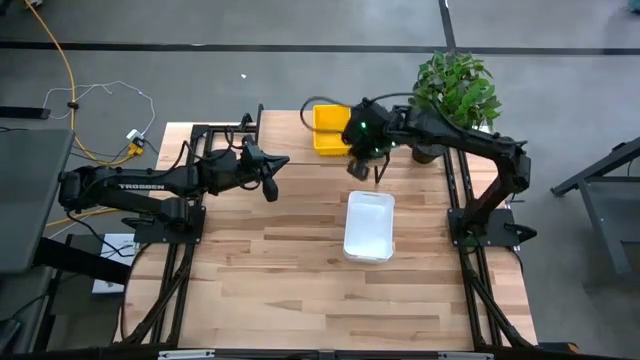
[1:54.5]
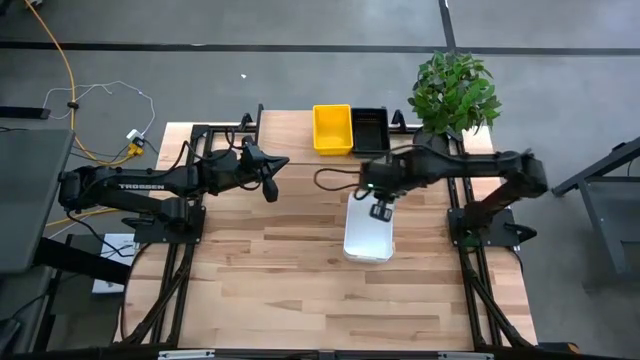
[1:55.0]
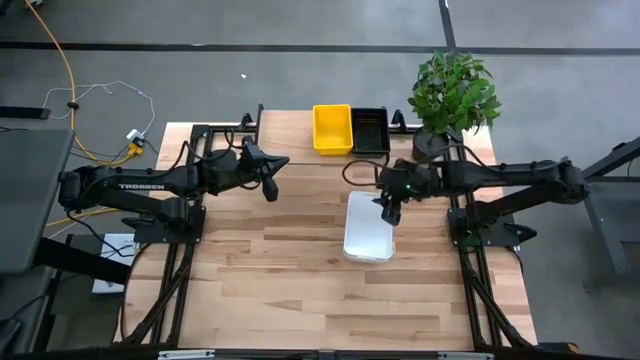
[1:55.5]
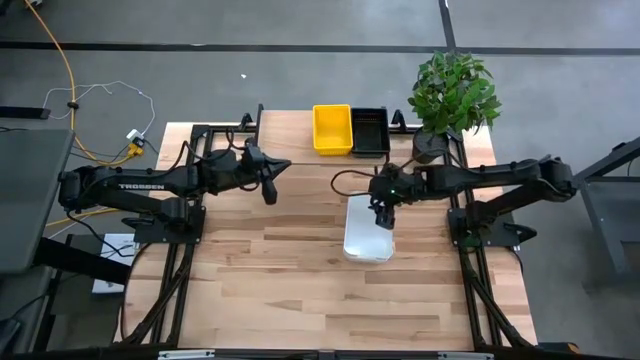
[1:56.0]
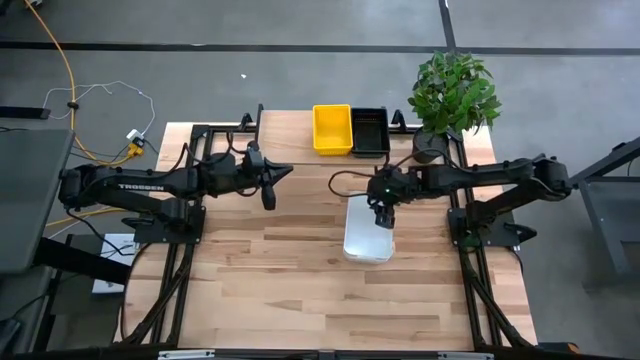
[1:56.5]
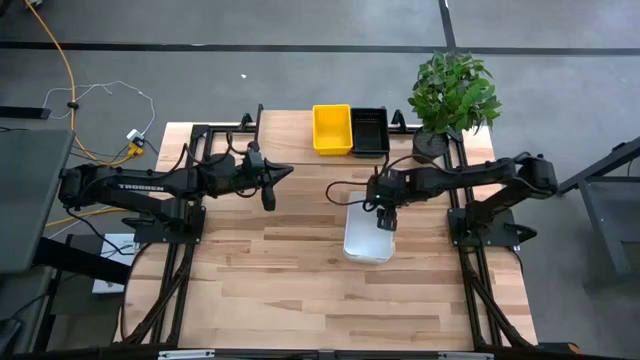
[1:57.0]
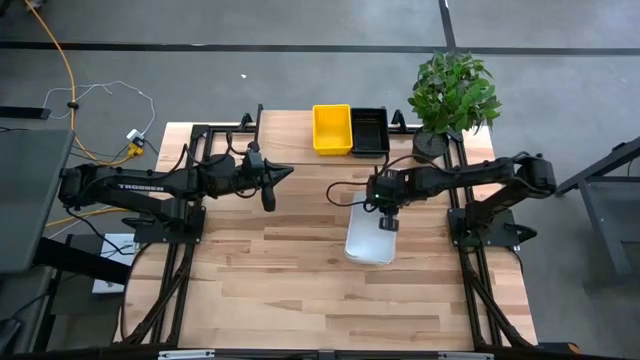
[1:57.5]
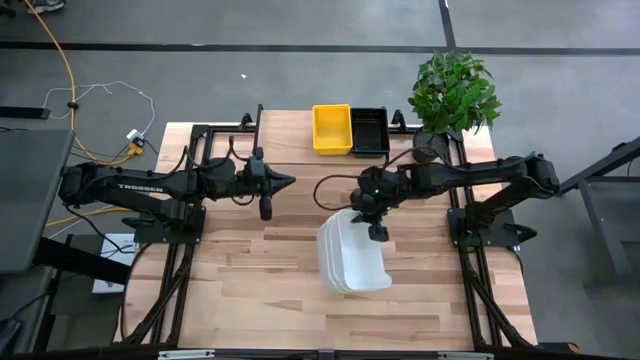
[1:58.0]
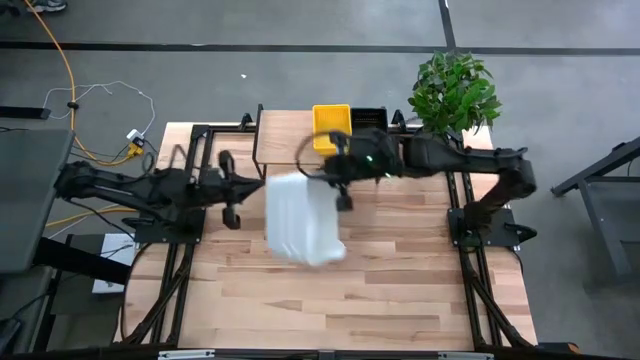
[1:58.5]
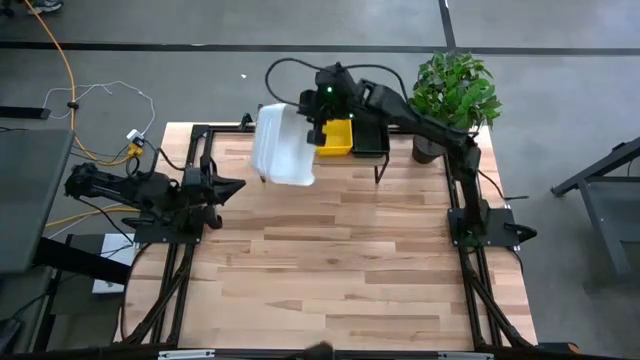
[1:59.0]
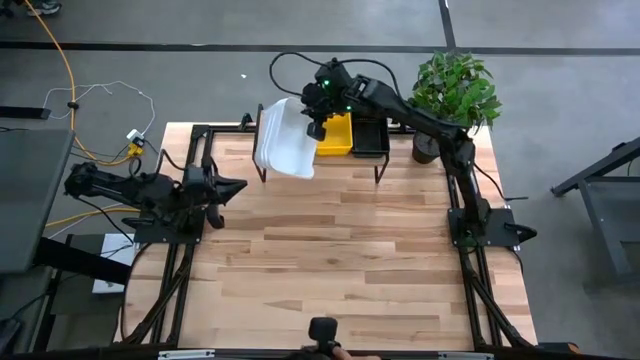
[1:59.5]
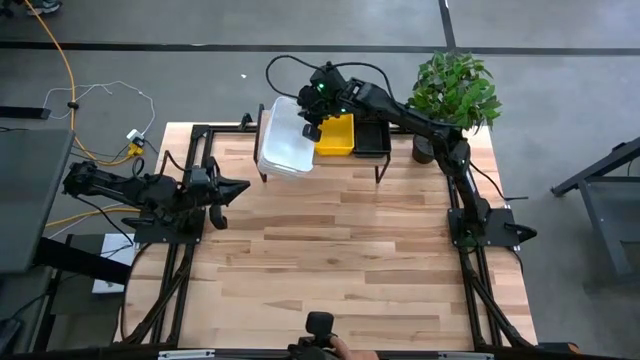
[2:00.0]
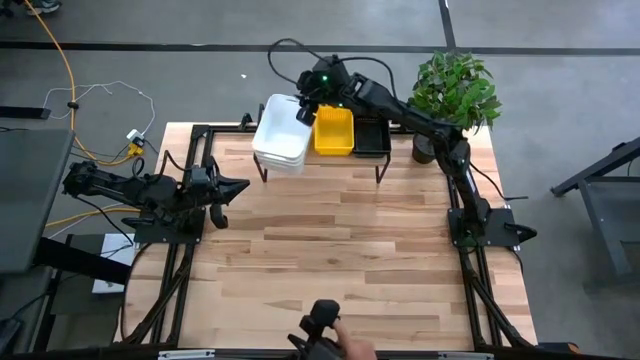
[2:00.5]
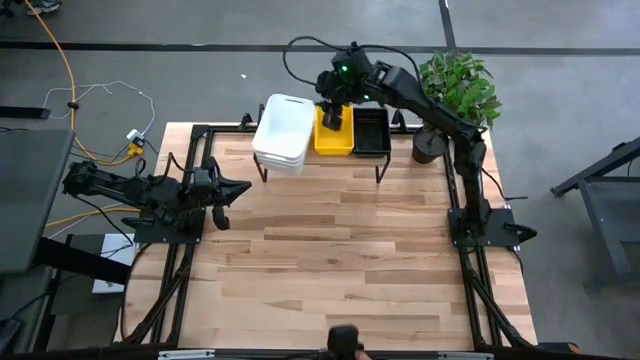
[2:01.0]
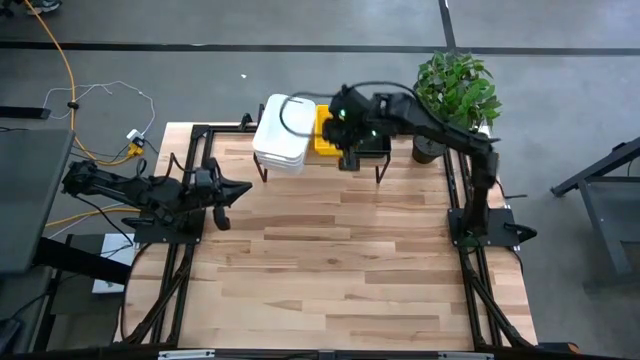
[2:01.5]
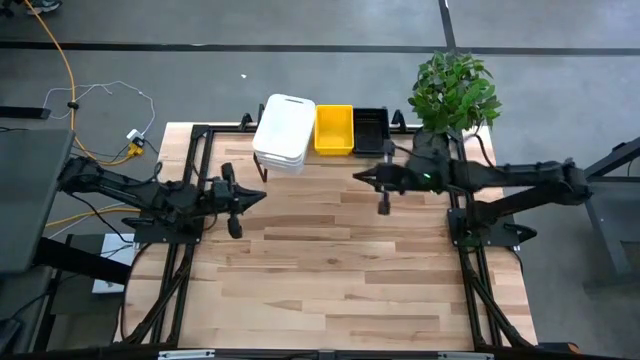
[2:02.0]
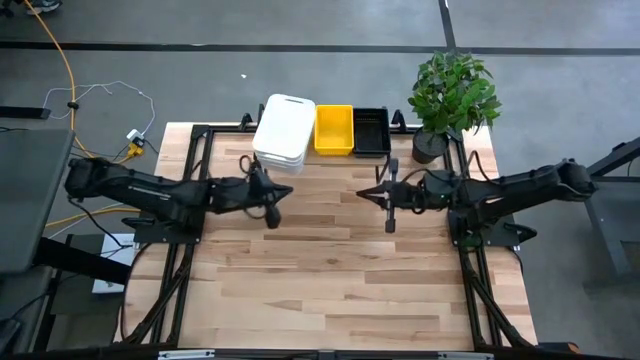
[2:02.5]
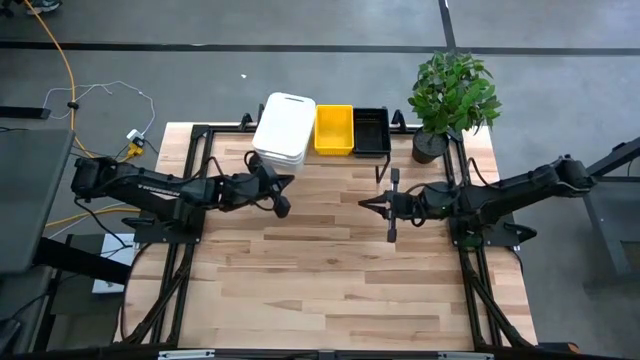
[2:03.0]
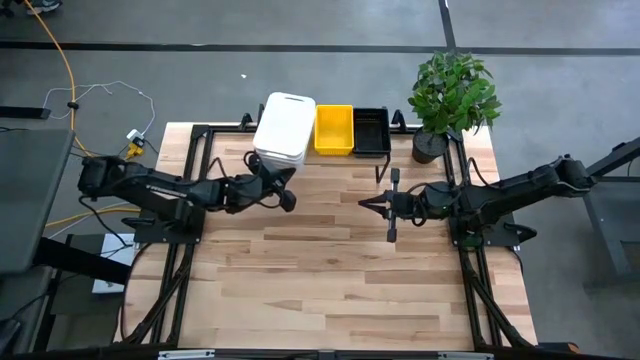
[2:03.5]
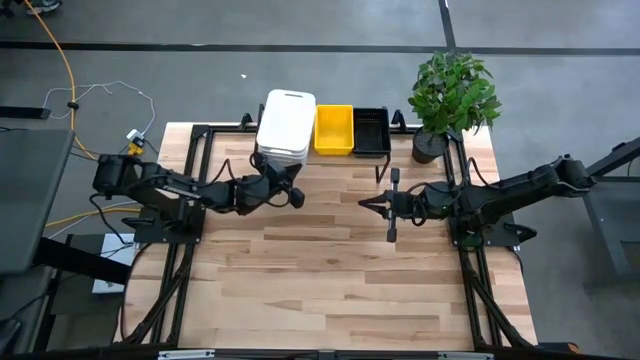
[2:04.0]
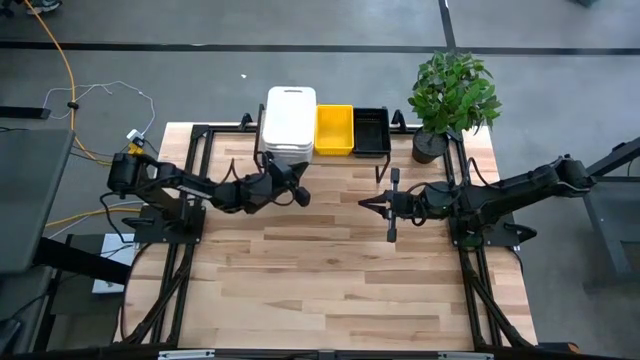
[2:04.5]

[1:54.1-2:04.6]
Task: Stack baskets on shelf by color
Put the stacked white bins on the shelf

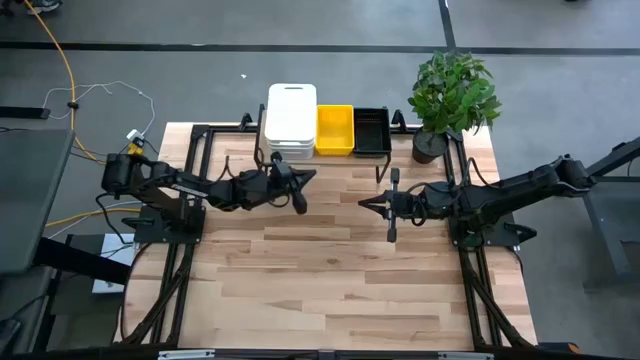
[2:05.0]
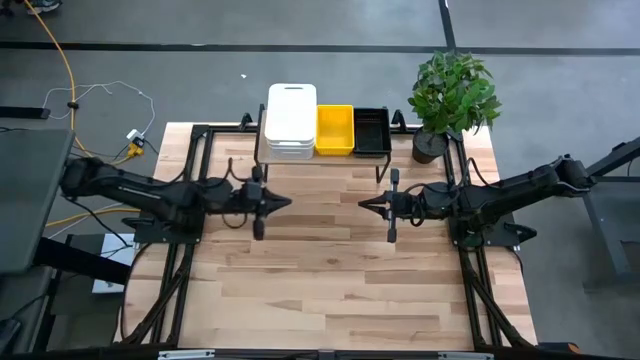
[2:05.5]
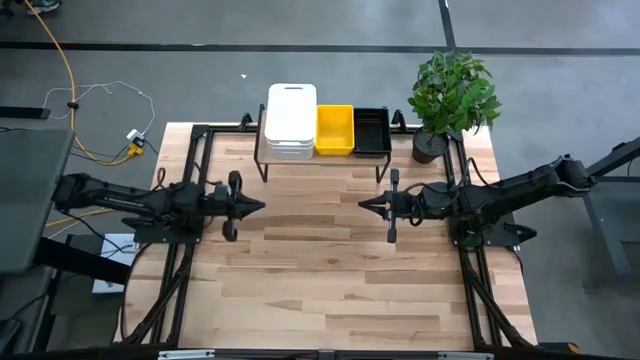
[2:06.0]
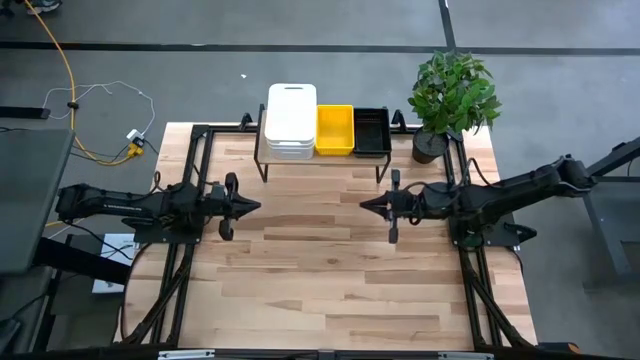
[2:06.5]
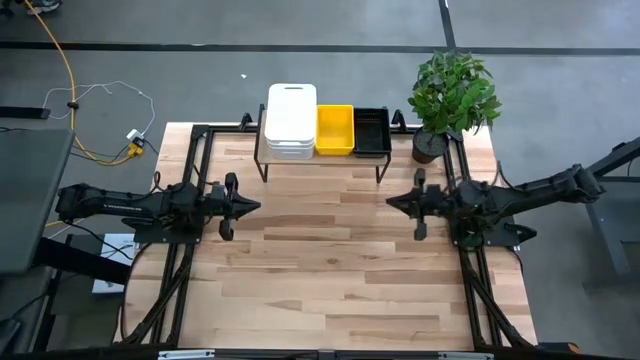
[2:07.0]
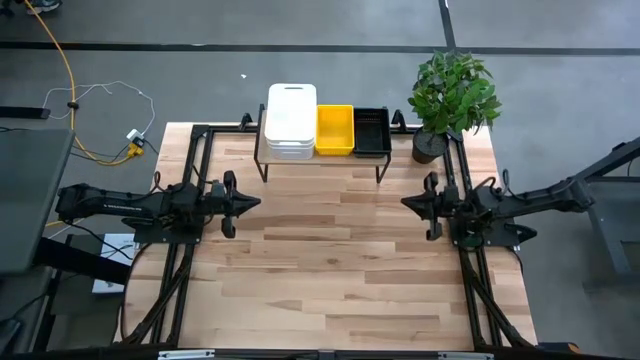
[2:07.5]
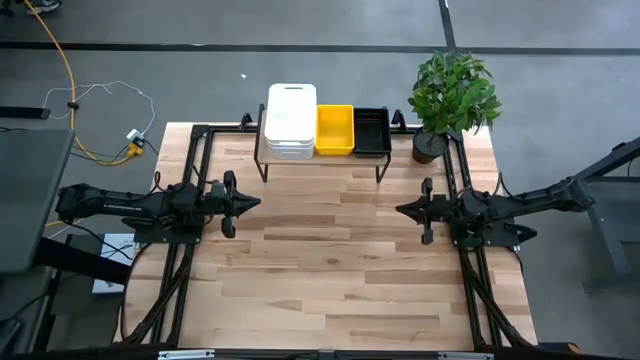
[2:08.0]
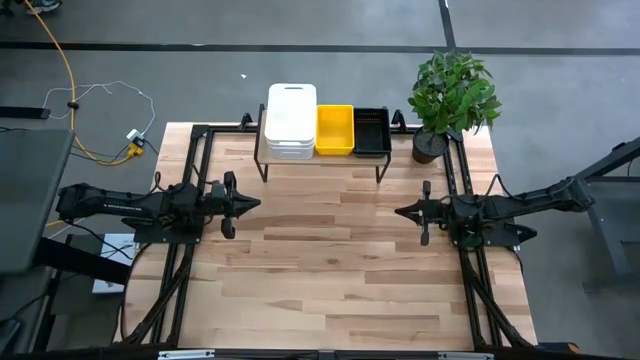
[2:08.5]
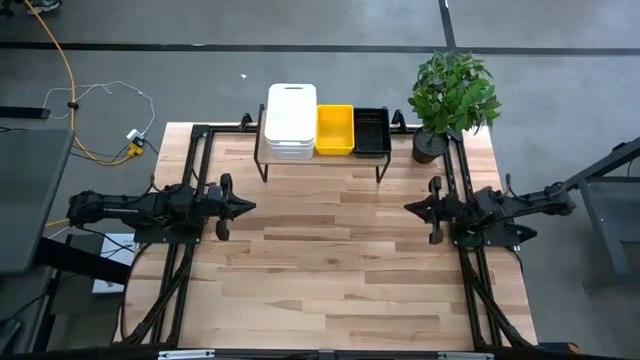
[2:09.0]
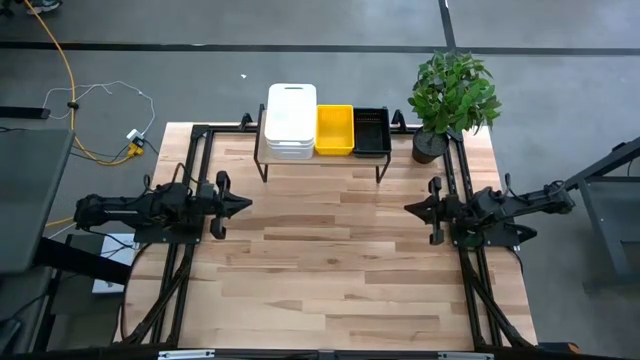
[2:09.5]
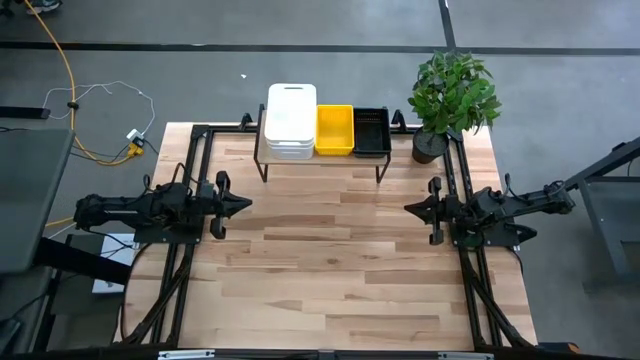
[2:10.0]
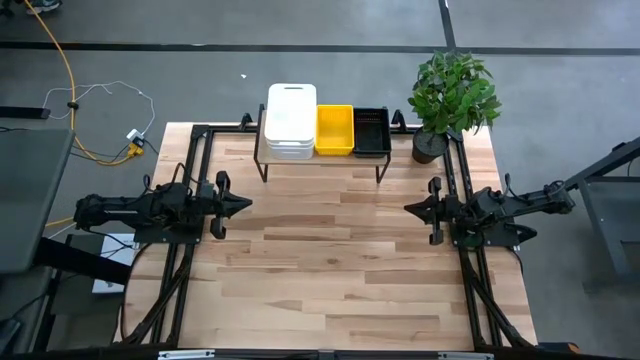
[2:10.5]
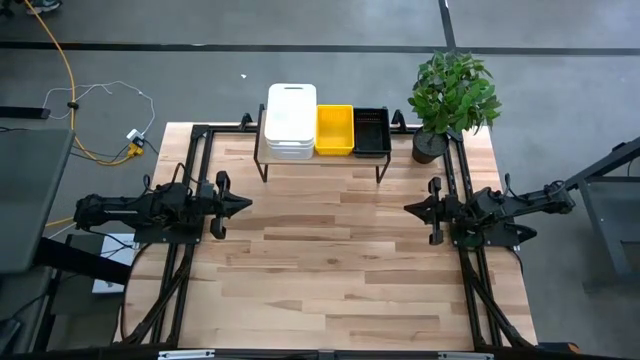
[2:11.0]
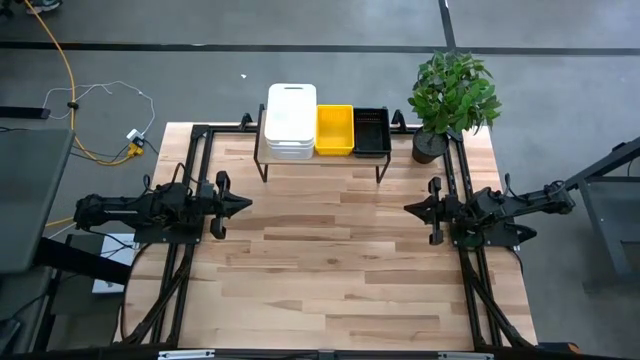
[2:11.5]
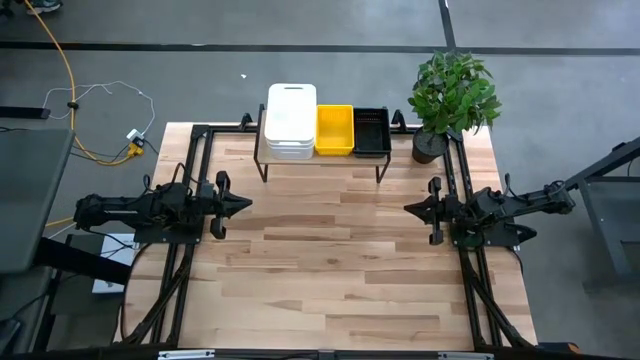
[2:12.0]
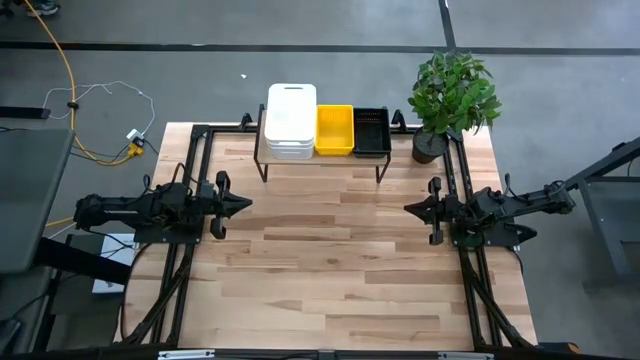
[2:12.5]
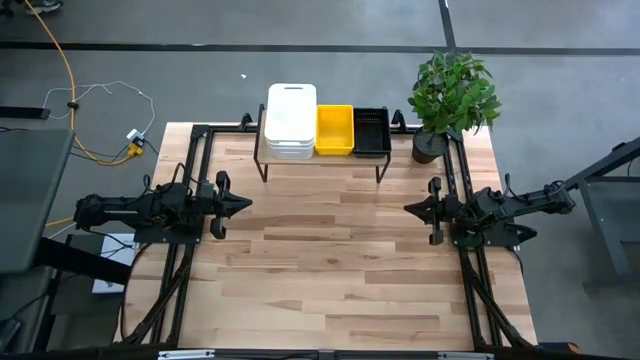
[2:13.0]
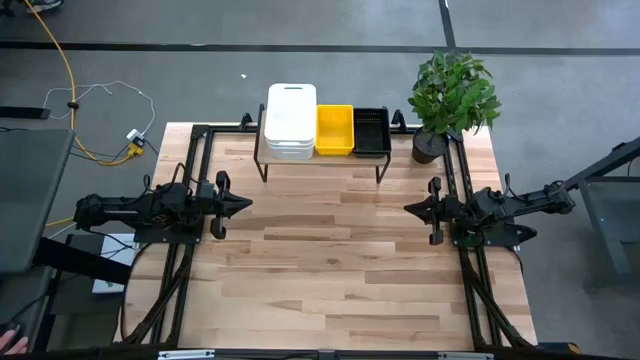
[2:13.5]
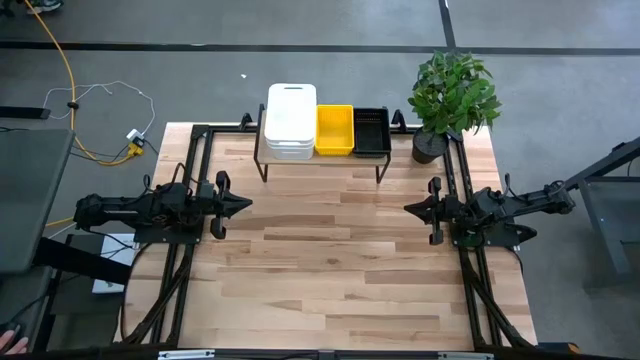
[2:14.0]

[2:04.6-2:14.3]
Return to Home Position

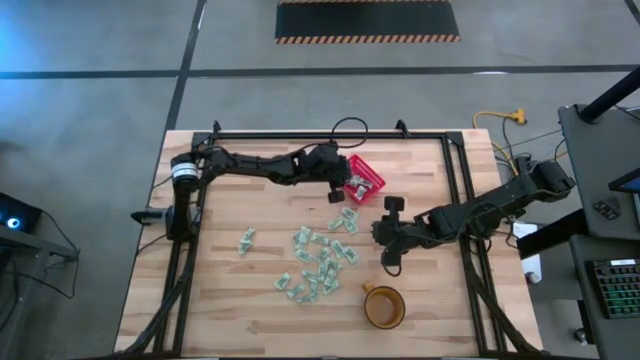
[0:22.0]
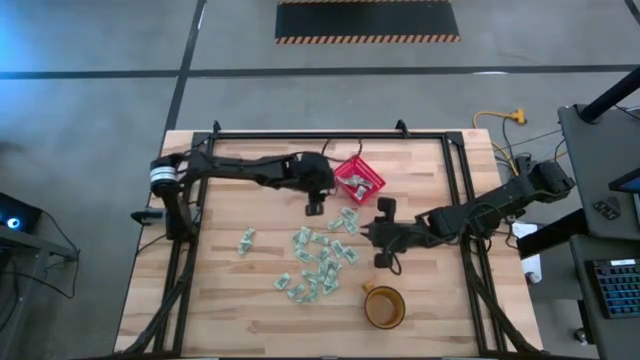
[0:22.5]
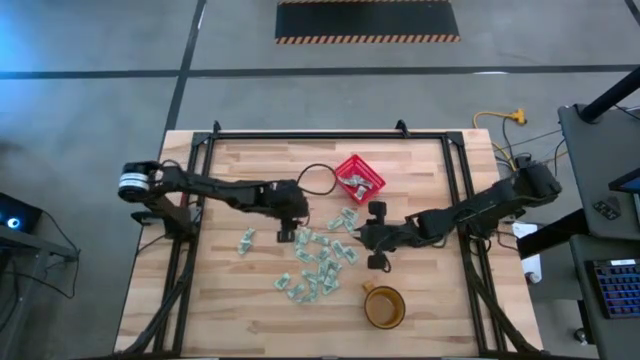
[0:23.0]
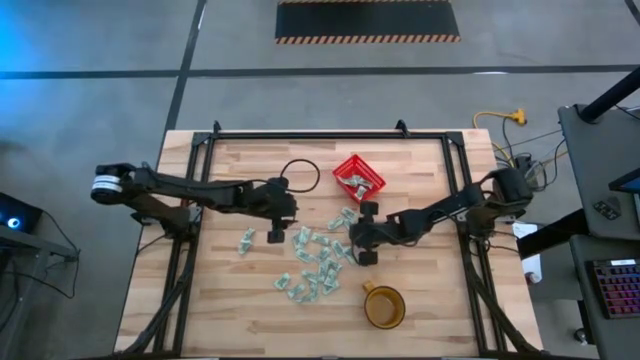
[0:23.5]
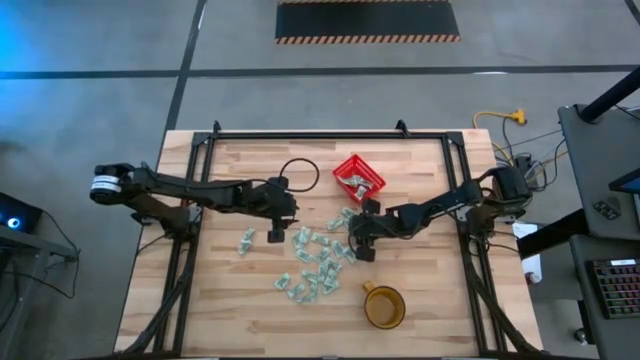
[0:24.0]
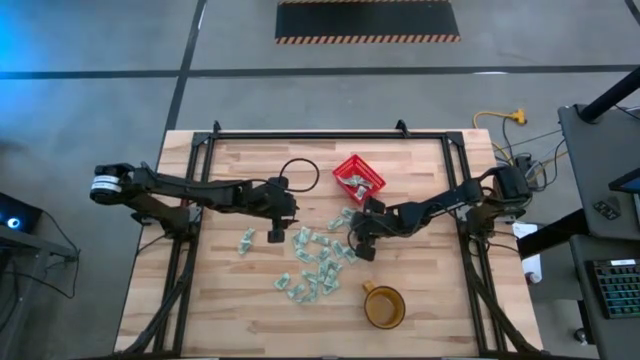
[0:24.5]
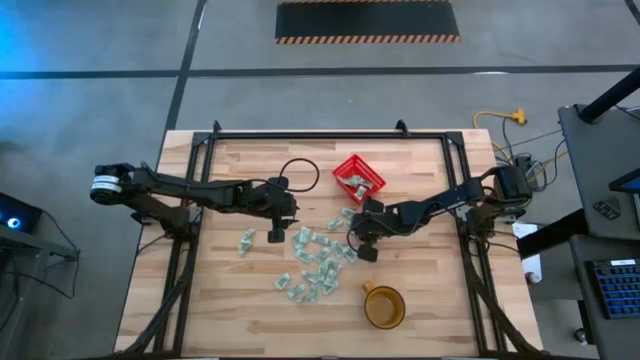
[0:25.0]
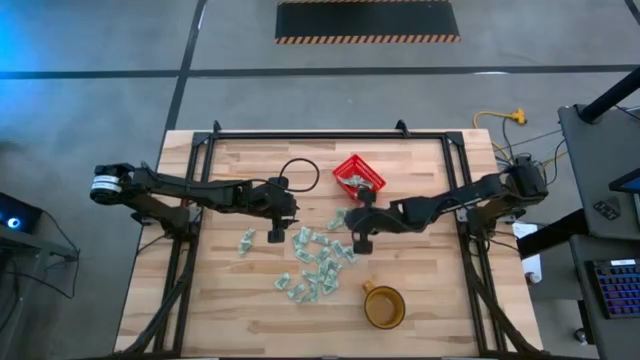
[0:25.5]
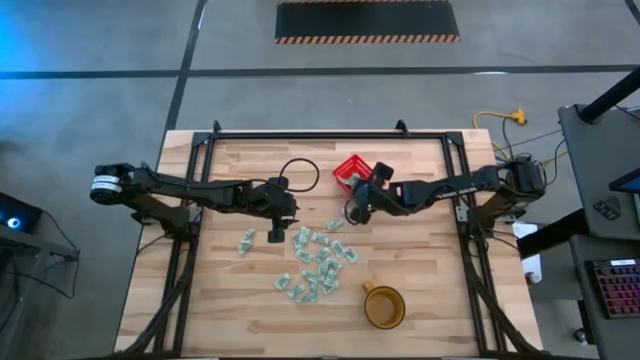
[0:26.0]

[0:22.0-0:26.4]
Task: Pick and place Stevia / Truvia into bins
Put the stevia packet into the red basket
